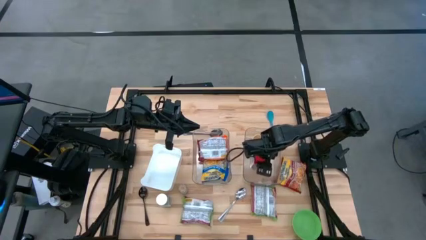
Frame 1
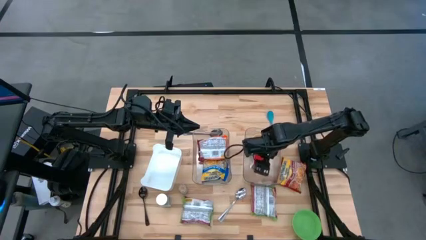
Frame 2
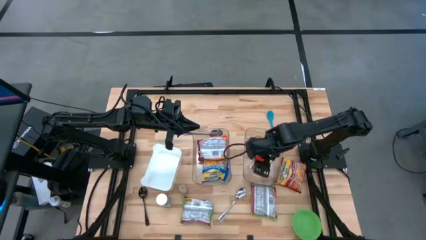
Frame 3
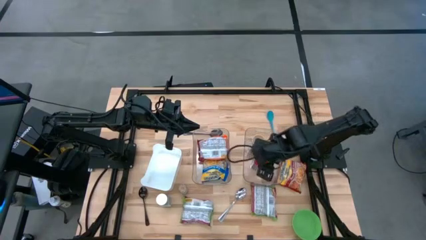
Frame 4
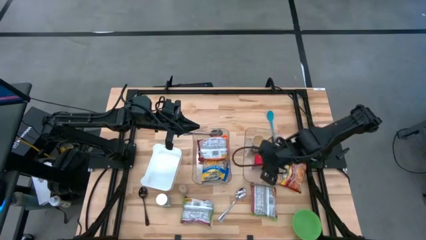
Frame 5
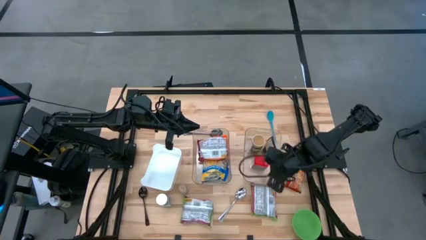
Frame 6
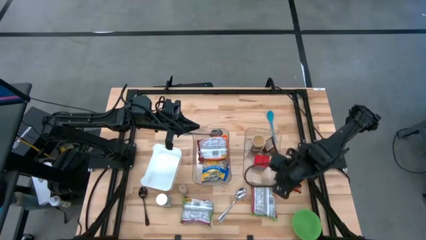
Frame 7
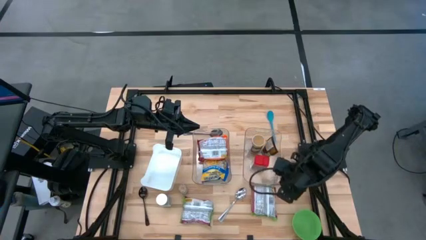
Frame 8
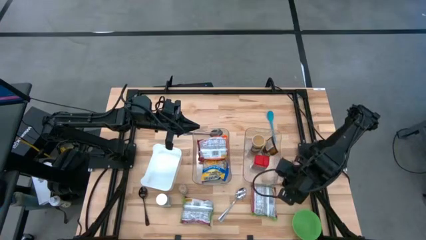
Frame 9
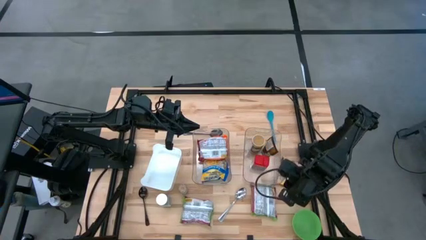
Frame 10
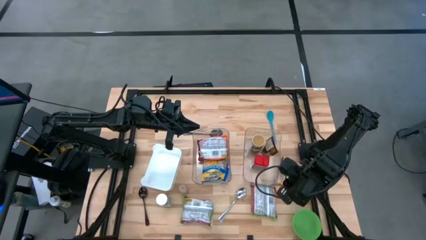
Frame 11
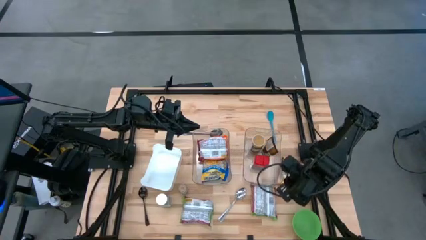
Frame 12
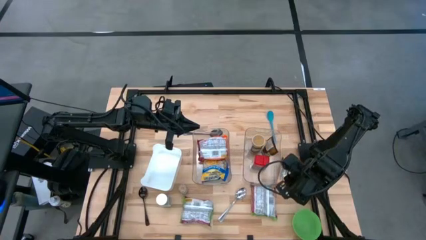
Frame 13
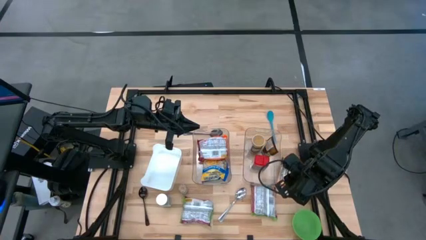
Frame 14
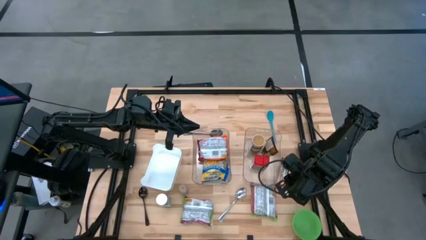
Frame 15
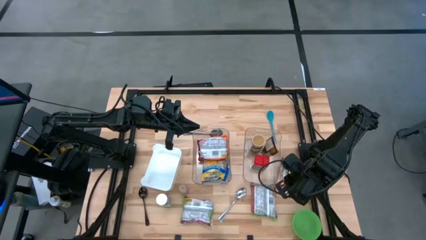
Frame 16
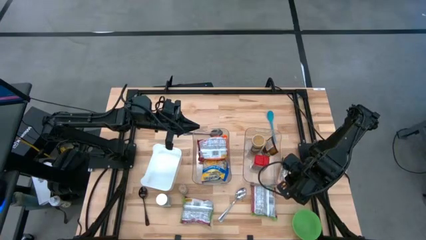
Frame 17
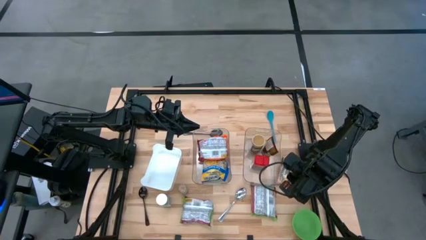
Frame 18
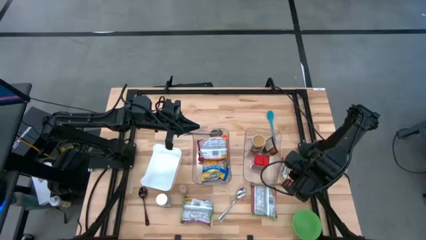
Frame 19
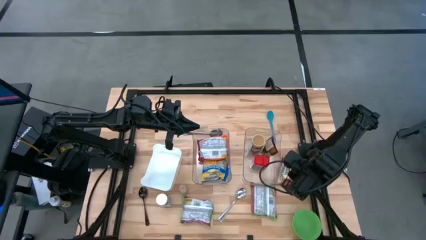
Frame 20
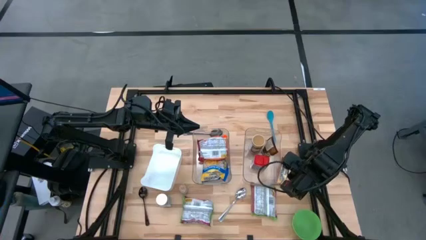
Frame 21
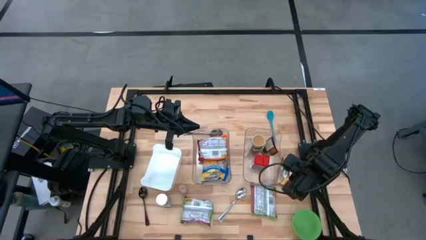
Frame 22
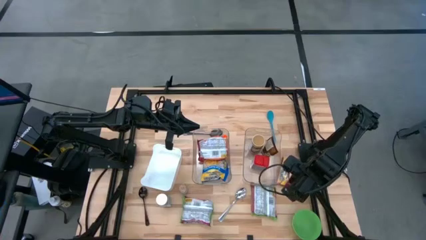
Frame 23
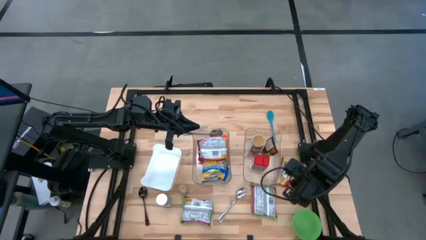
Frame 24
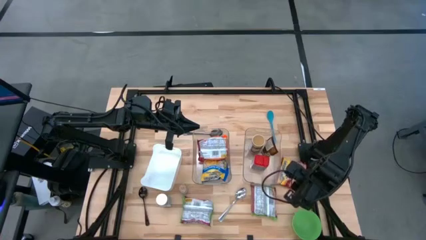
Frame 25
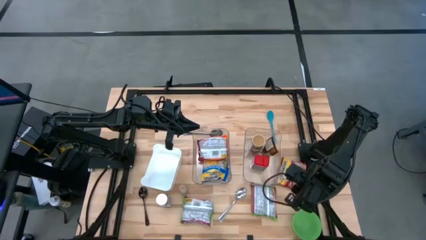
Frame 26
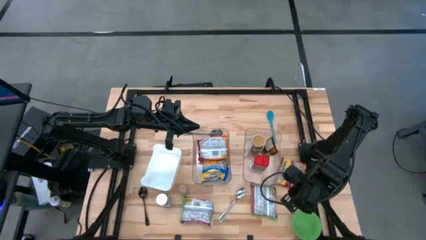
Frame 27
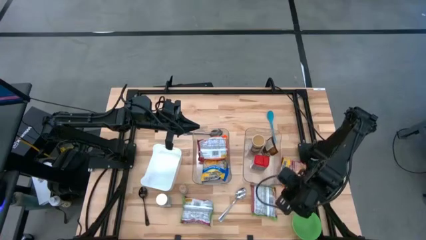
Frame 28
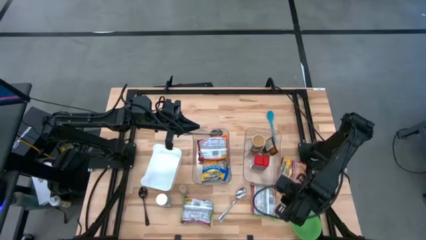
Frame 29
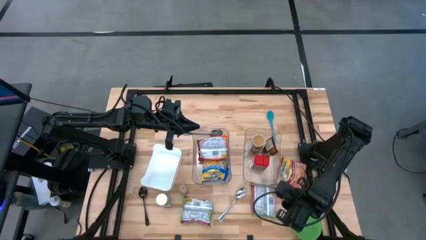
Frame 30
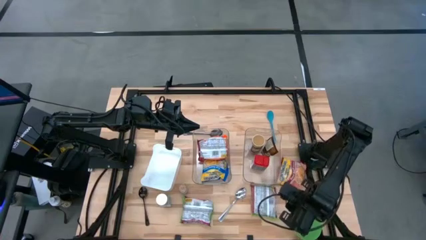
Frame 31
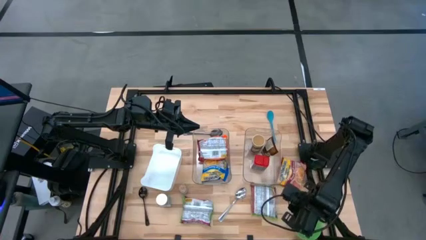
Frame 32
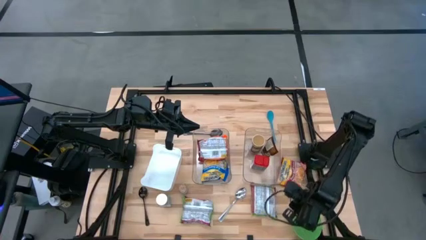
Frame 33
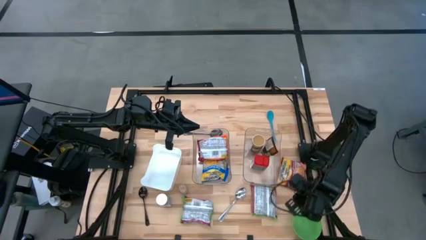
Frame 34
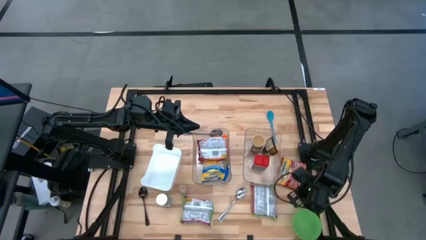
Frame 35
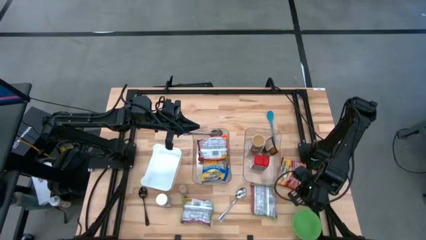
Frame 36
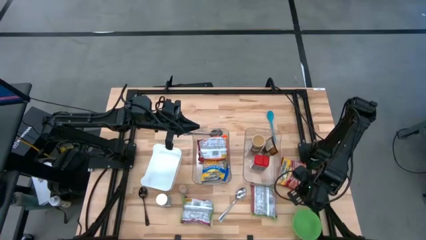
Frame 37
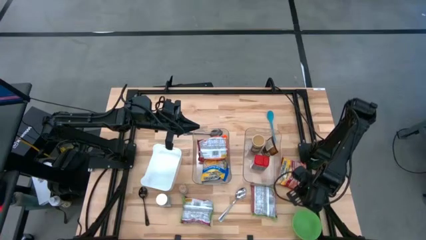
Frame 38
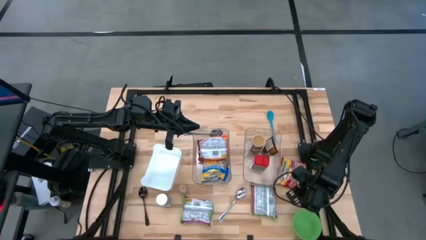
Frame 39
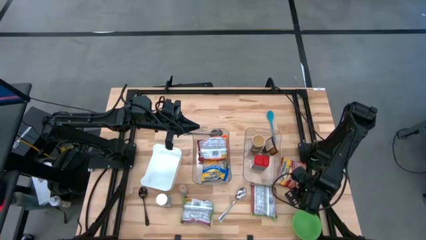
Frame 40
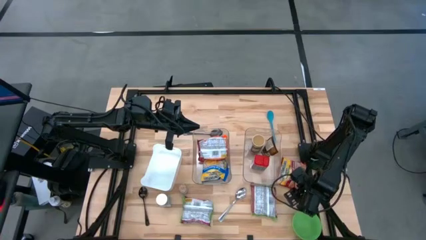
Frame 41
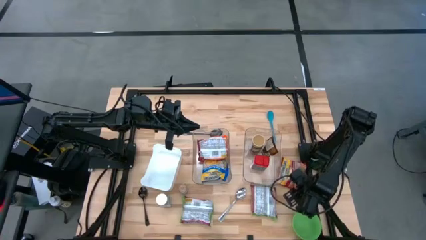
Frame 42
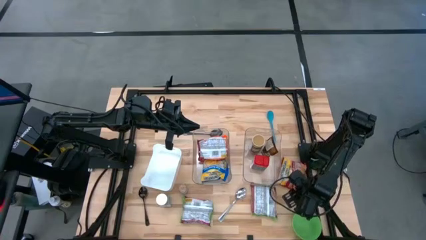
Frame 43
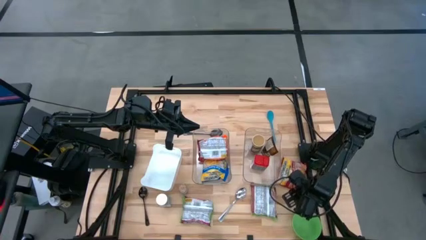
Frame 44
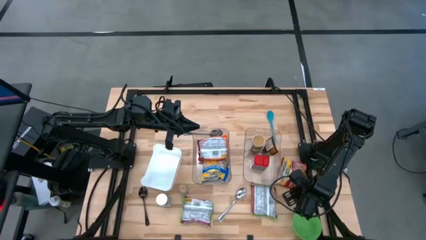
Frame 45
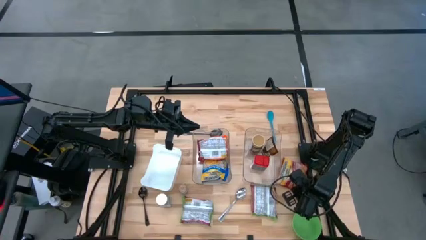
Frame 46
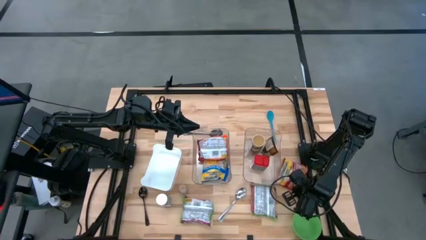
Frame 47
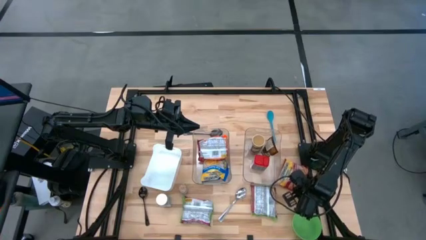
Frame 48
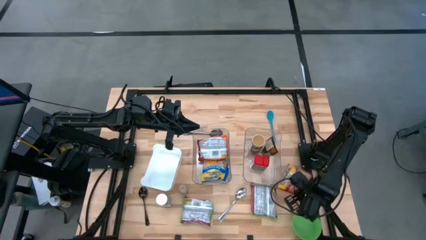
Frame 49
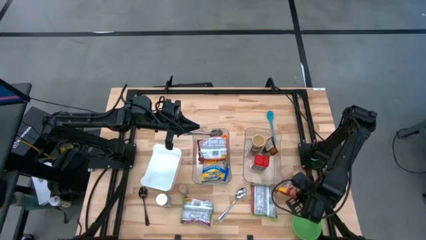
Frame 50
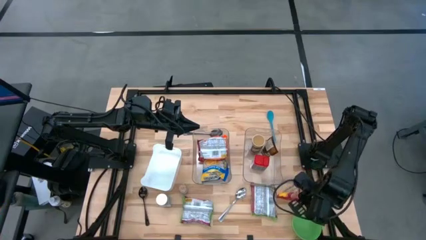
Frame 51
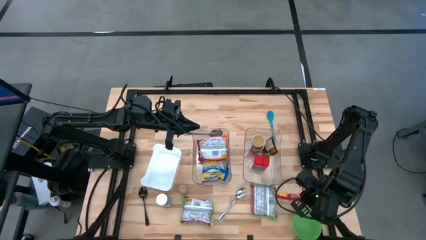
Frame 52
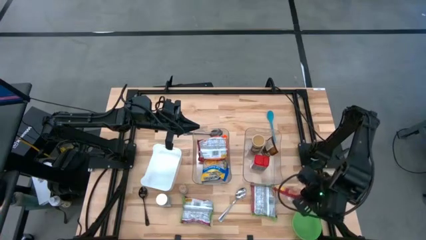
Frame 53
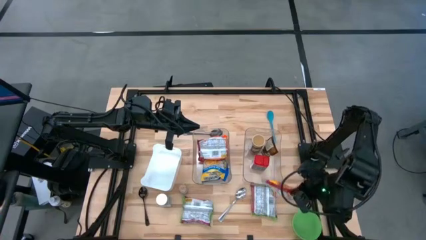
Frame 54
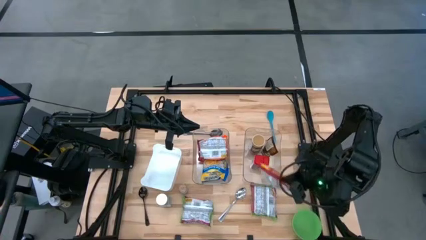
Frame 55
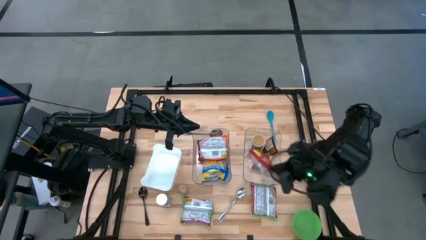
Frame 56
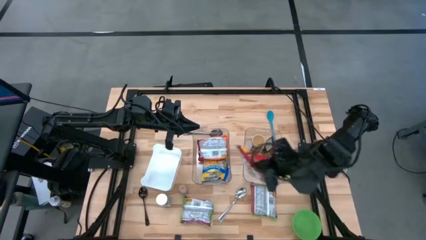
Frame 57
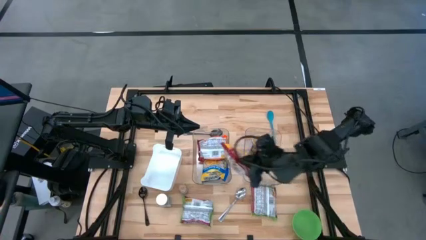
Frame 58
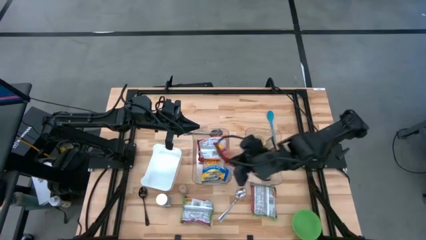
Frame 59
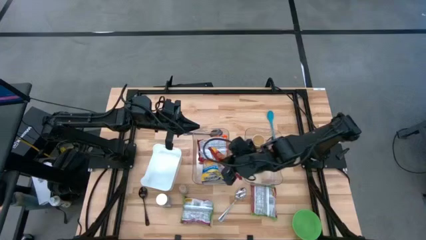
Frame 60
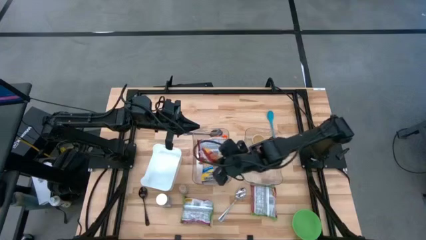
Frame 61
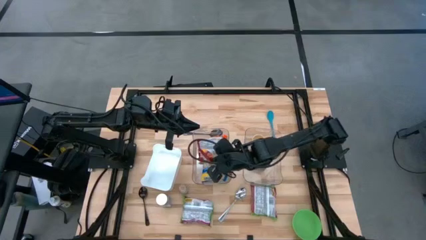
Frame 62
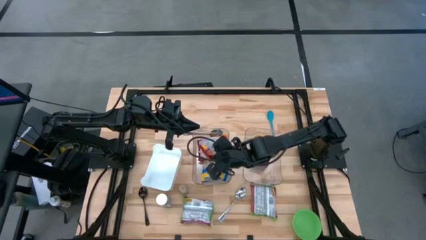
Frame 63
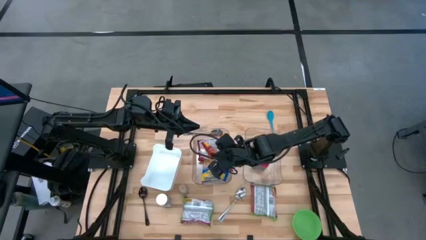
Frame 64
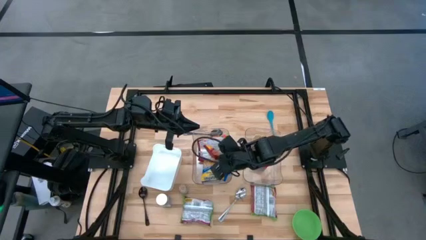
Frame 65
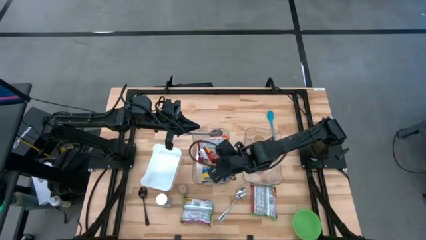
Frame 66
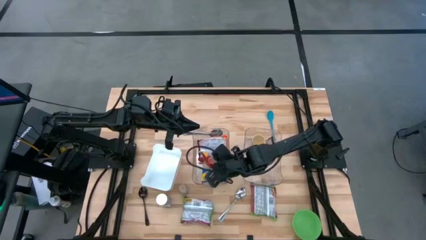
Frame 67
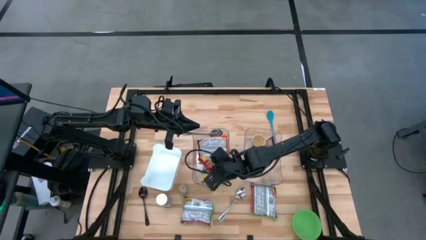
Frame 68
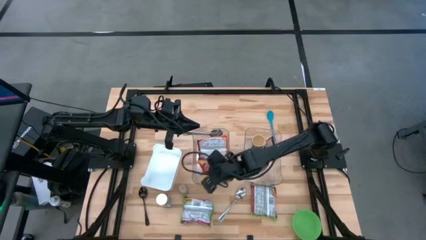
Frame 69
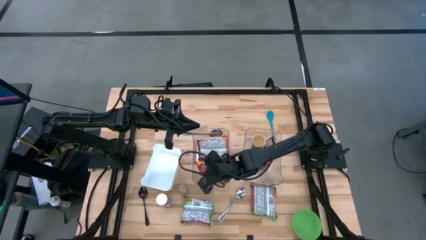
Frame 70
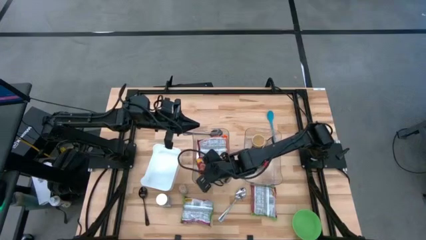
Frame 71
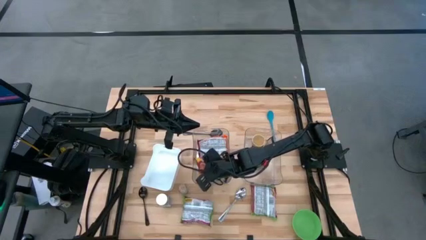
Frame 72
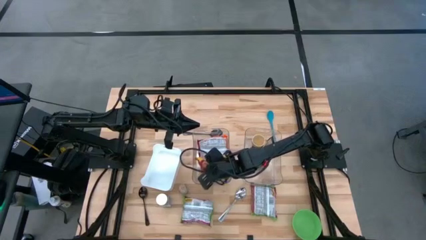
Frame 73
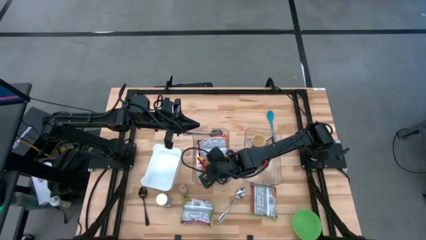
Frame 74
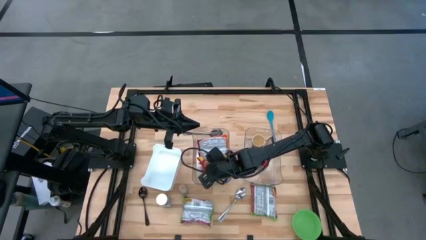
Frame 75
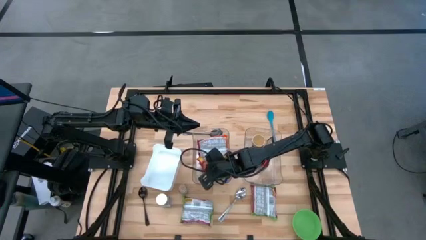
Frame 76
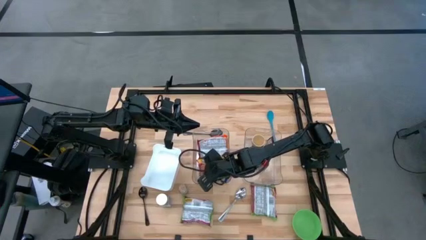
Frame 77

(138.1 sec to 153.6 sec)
Task: Pick & Place Food Item
Put the red noodle pack into the left transparent bin
